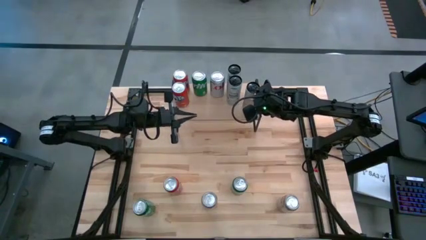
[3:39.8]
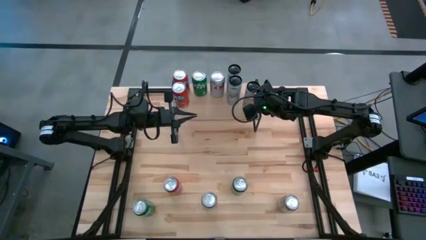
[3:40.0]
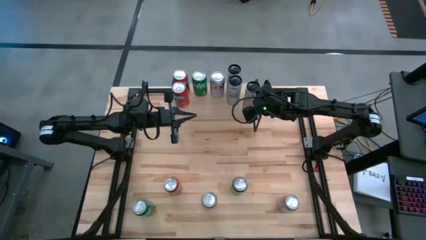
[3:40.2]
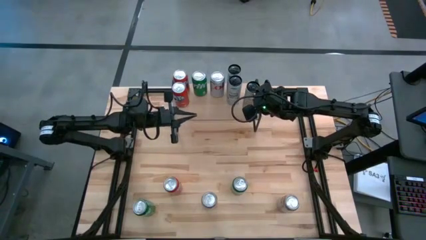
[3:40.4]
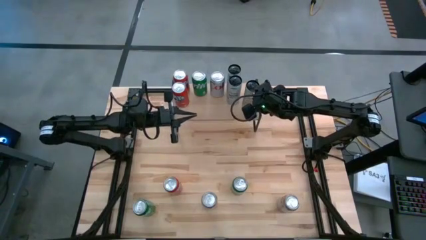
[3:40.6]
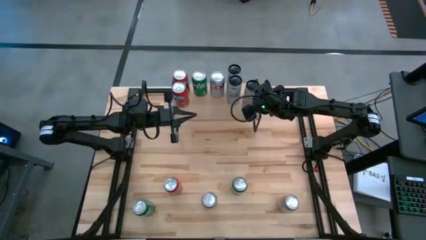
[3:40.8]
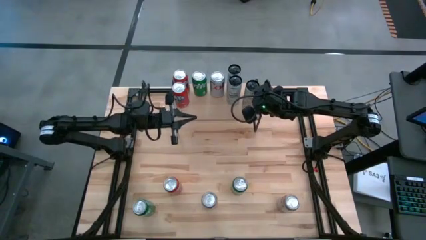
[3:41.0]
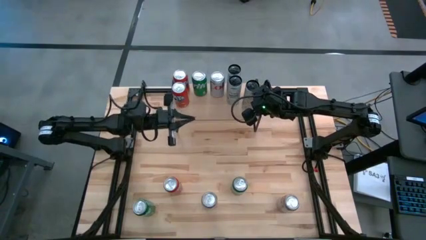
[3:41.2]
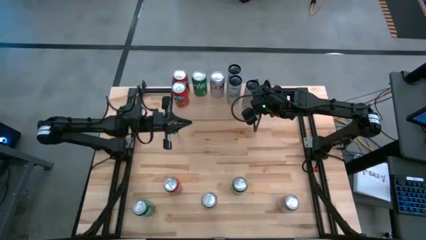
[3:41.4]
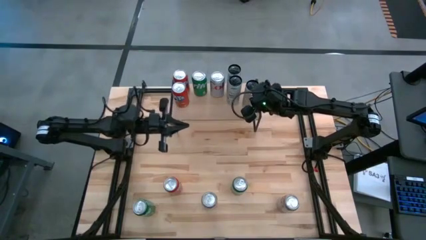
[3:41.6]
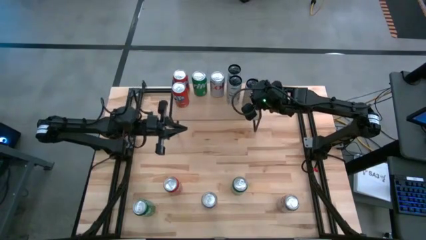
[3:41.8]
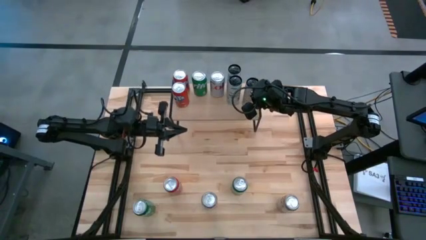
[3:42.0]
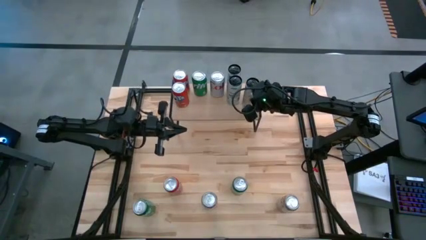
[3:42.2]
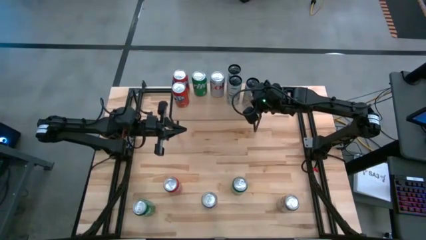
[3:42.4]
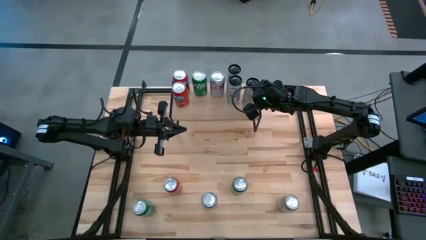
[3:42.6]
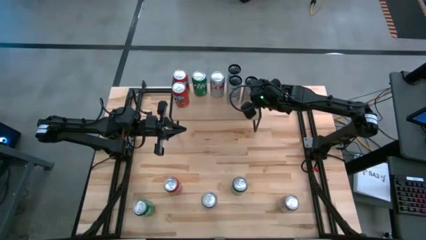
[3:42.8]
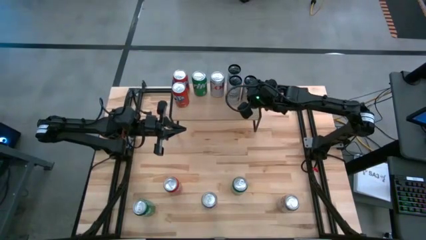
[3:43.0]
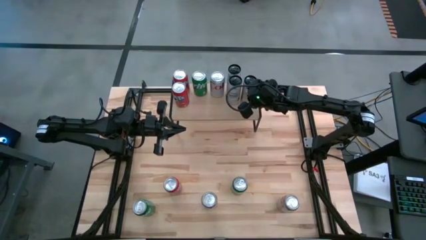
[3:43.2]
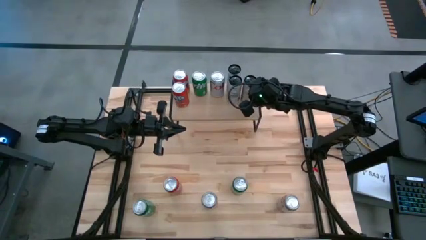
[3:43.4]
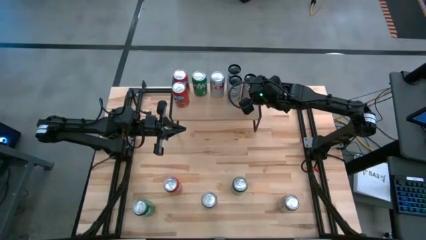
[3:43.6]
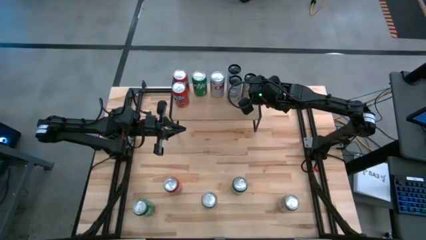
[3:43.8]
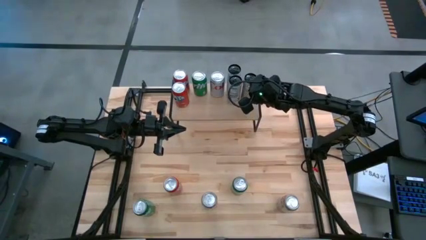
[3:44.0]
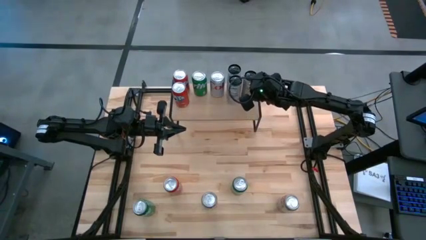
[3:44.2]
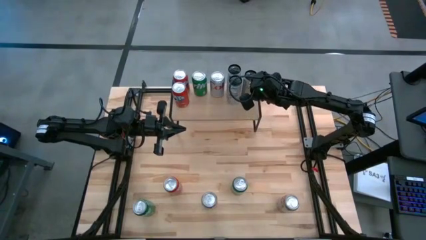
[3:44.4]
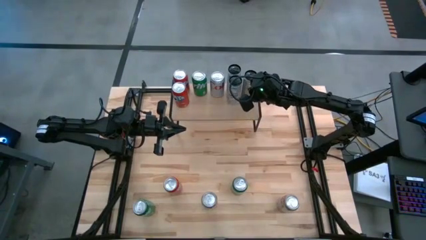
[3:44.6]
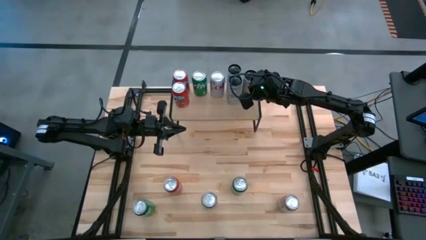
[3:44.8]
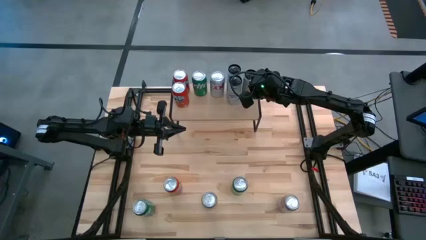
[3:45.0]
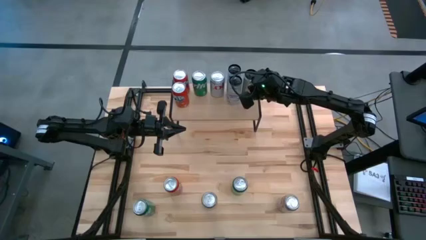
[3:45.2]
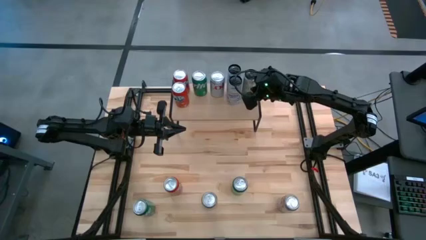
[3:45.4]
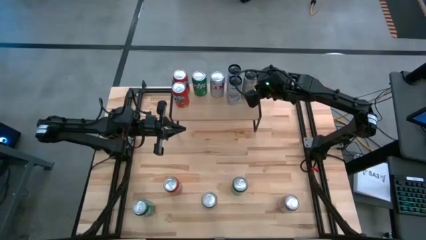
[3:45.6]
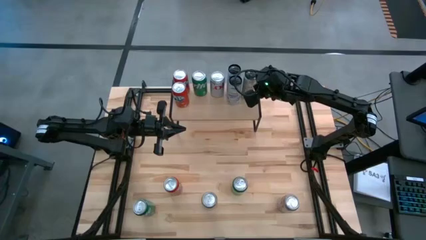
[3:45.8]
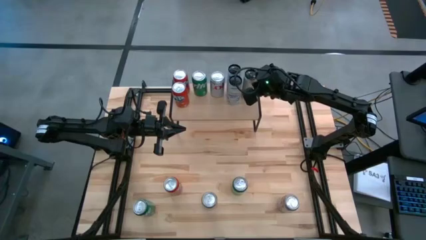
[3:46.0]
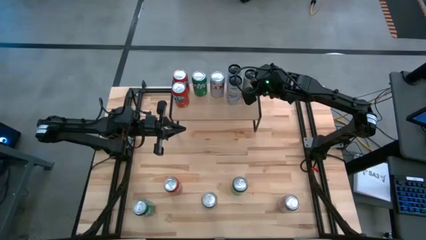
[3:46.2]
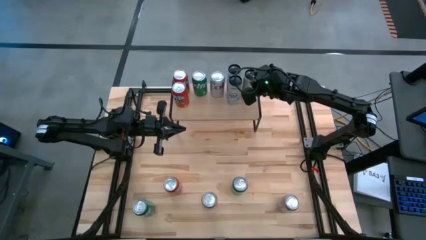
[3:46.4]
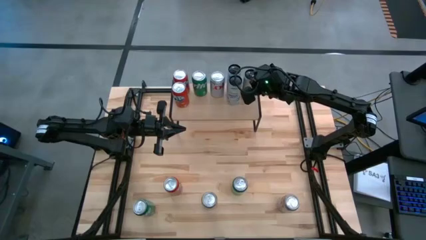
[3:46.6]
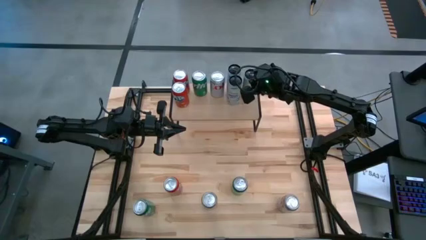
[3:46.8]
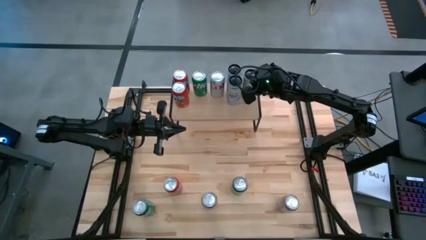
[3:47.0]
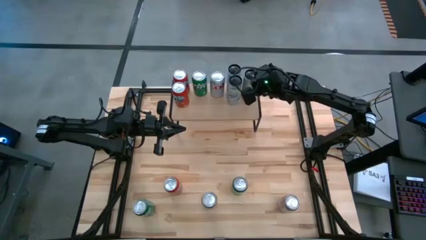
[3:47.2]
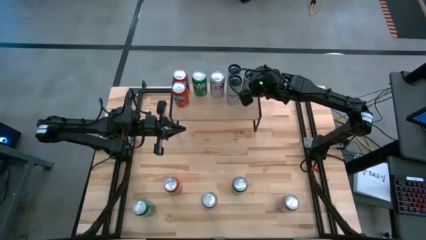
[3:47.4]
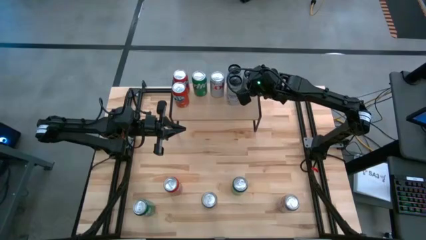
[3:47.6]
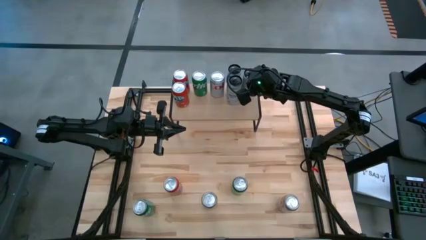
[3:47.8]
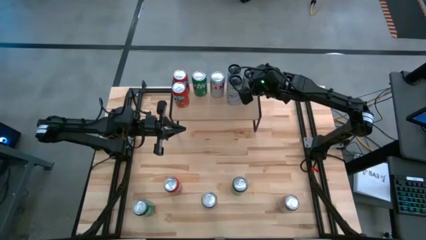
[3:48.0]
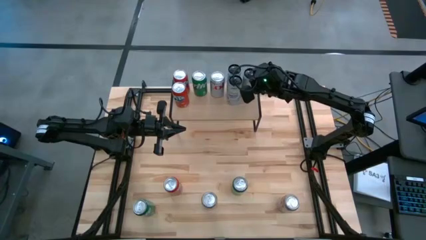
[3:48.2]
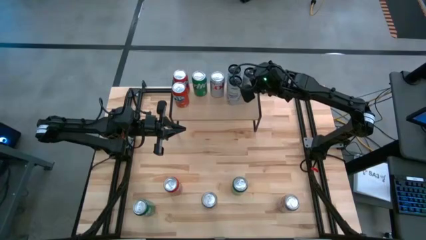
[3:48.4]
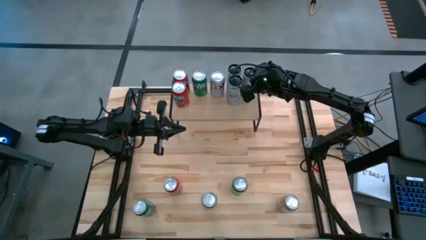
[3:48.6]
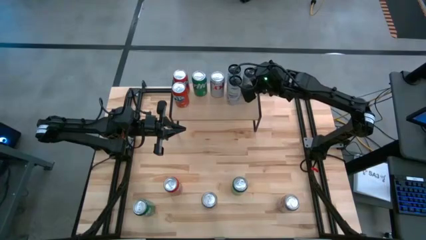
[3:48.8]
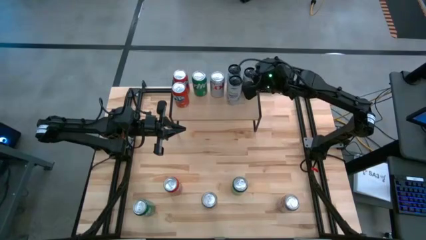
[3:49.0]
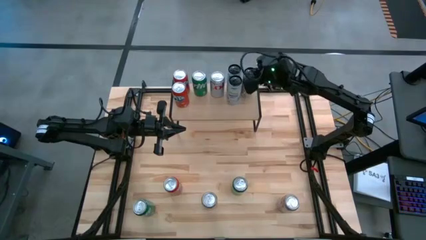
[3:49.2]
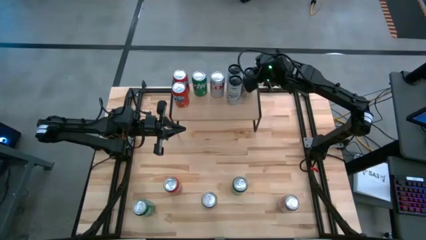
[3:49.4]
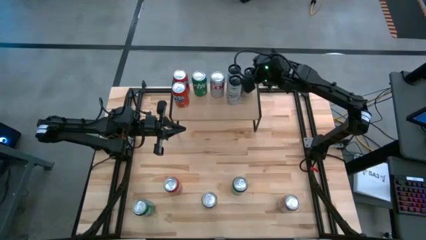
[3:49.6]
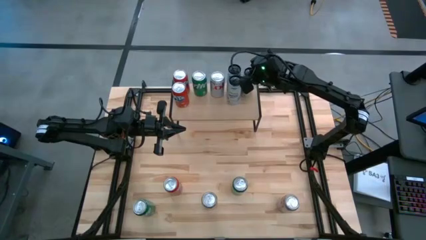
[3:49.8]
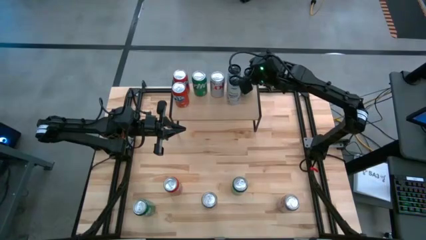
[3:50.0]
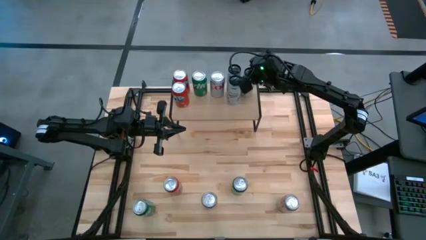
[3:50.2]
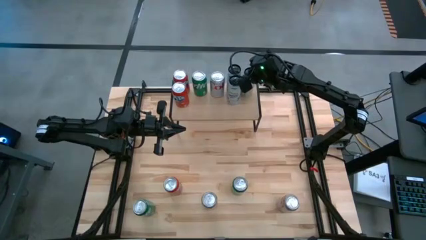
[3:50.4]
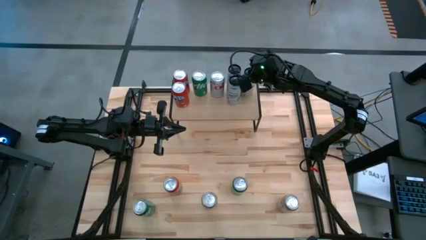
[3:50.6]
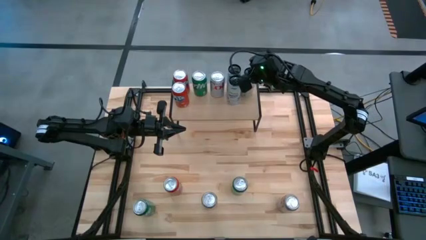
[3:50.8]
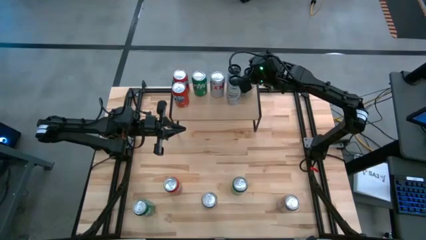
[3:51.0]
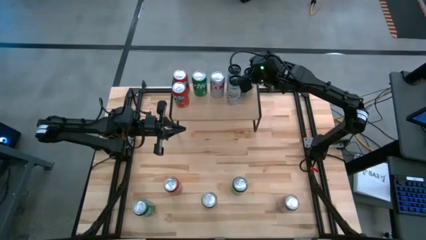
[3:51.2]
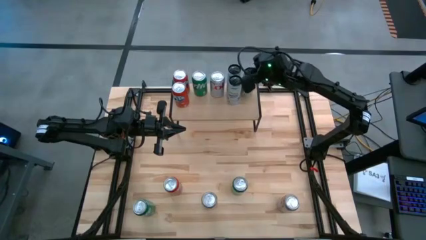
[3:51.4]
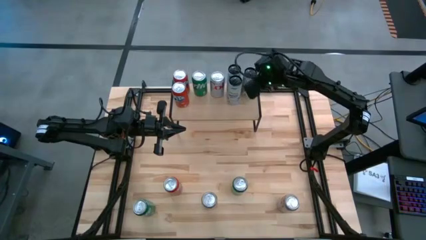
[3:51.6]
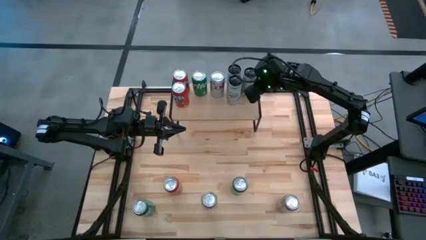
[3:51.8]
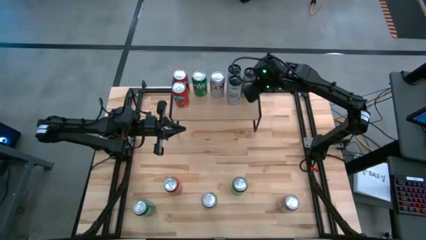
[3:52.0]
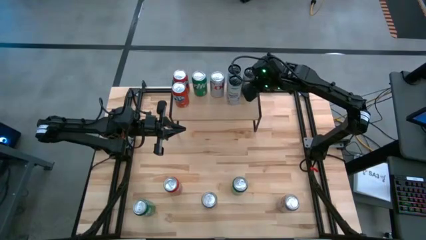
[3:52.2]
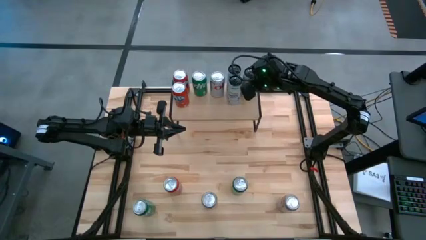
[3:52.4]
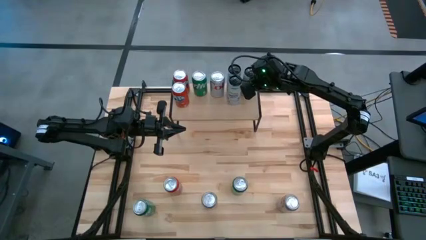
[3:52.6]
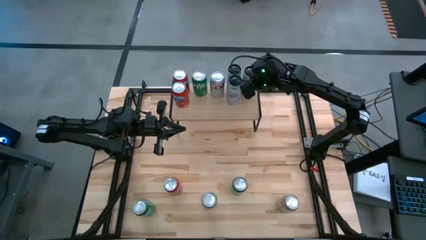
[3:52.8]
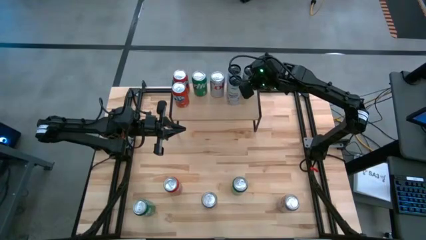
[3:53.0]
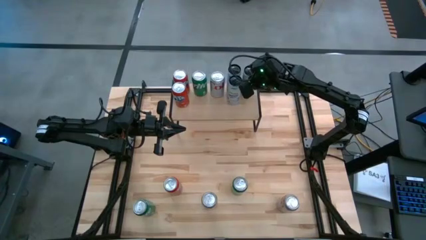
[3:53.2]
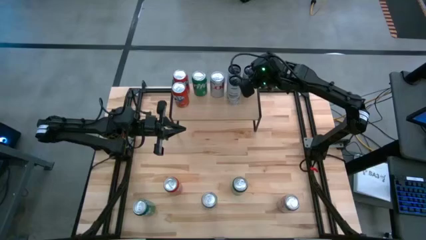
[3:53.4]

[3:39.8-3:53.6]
Task: Place canned beverage on shelf
Put the white-yellow soda can on the shelf

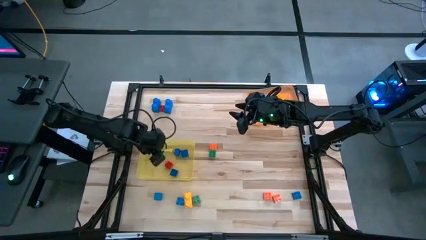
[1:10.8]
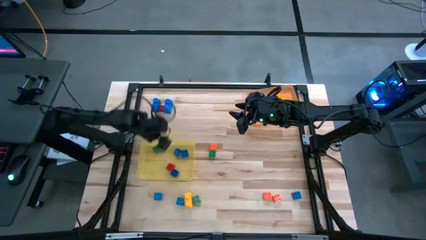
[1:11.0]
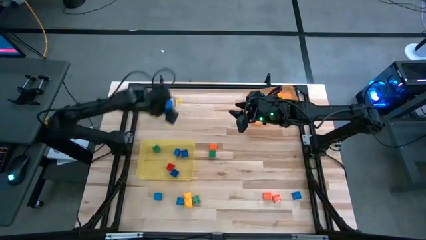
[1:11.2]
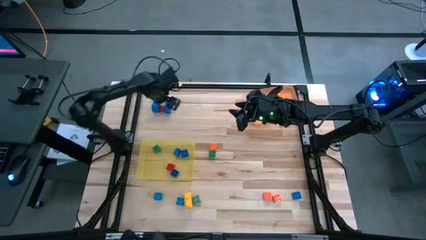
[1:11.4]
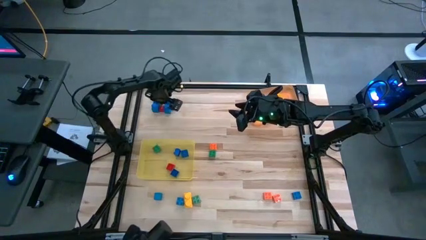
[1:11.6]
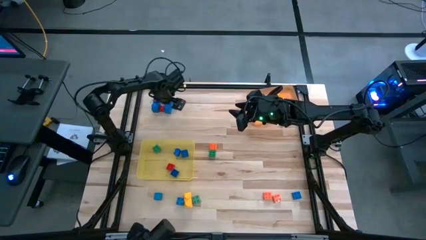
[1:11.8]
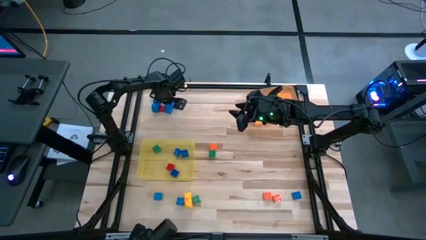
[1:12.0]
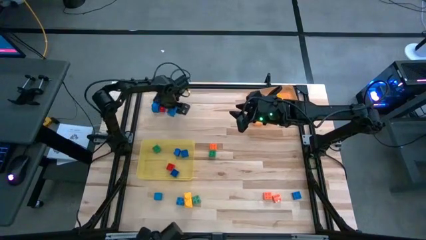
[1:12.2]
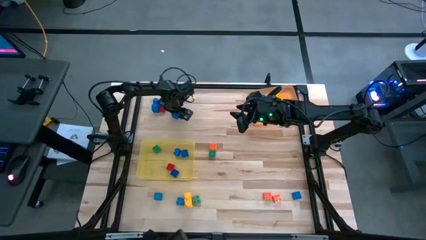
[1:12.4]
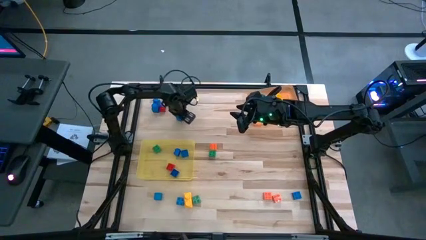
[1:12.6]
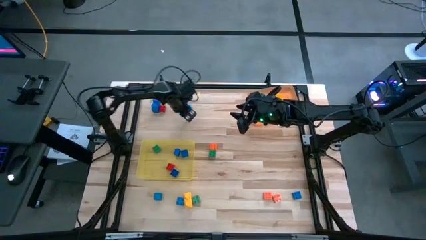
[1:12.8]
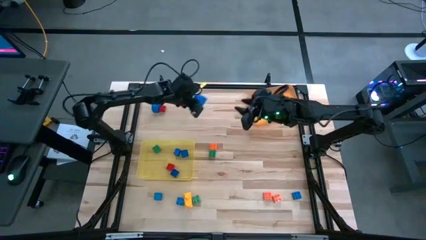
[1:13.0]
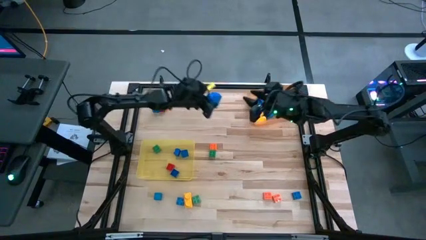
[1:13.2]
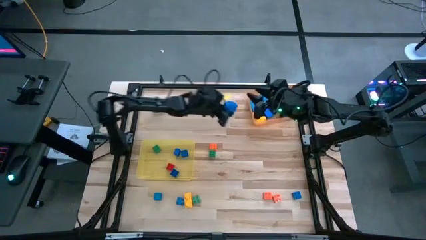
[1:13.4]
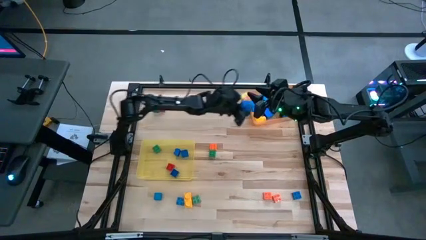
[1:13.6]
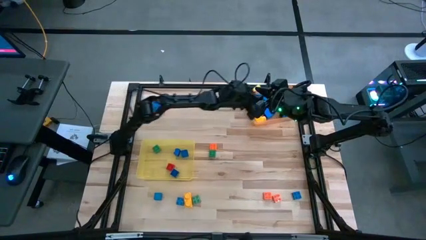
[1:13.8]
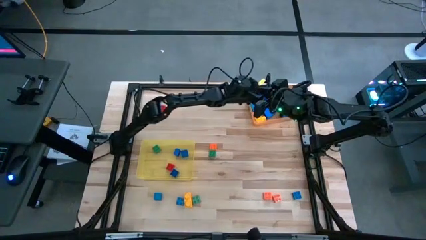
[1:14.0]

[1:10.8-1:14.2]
Task: Sort blocks by size
Put the large blue 2 stud game piece into the orange bin
